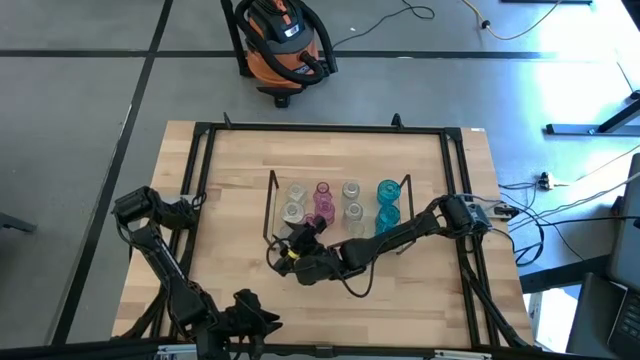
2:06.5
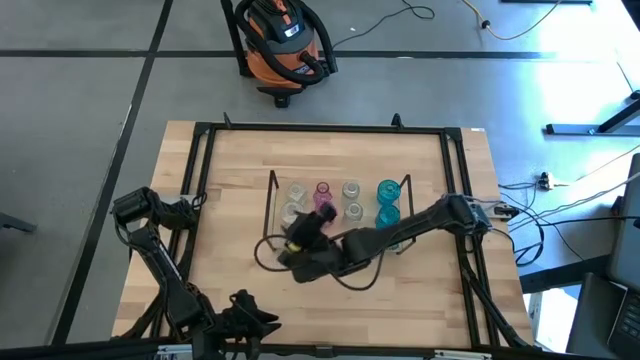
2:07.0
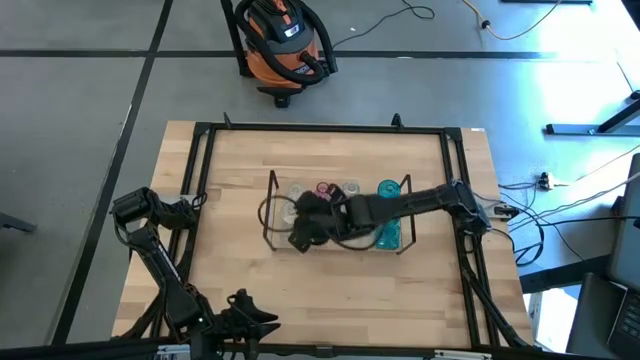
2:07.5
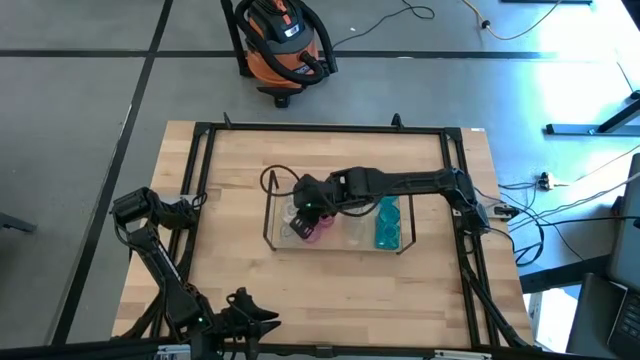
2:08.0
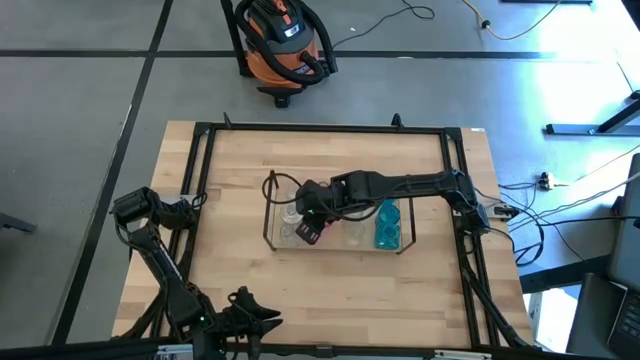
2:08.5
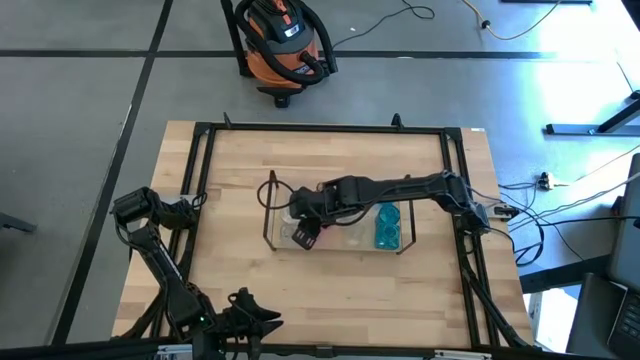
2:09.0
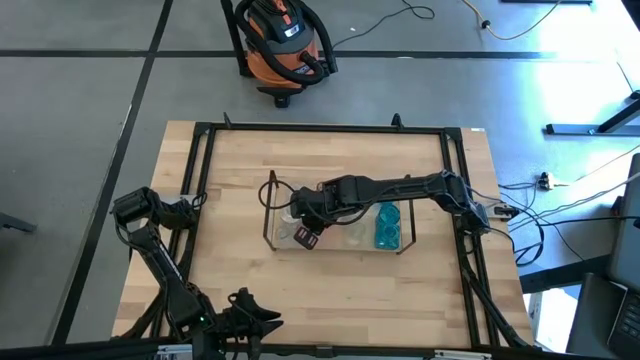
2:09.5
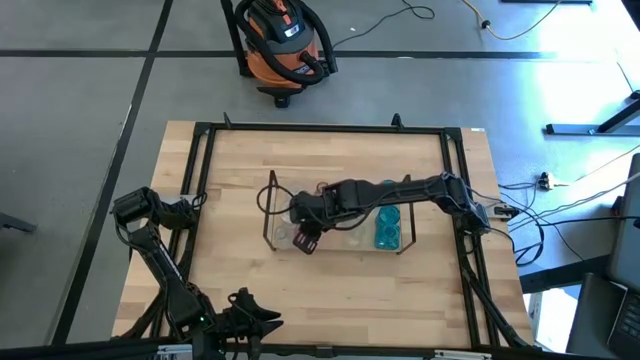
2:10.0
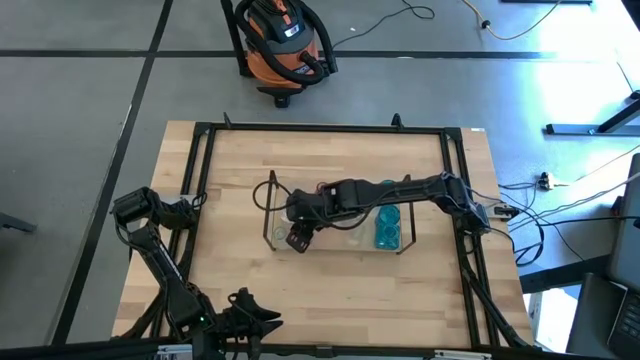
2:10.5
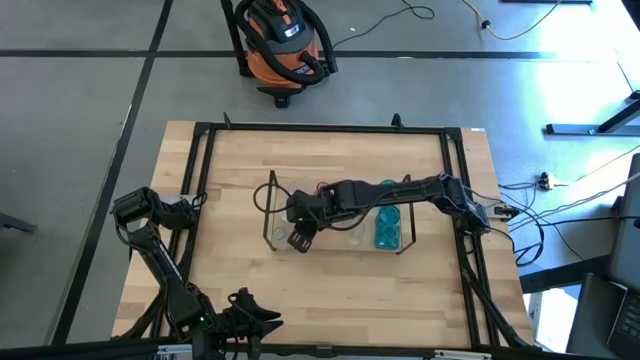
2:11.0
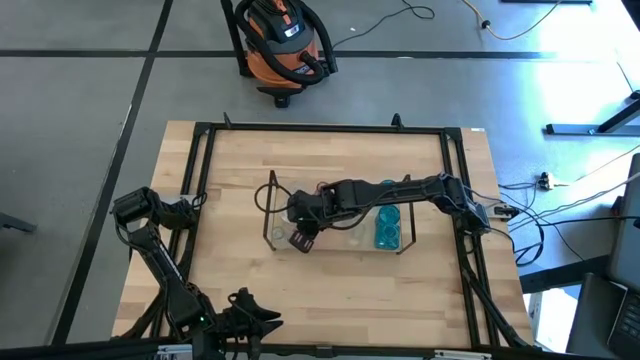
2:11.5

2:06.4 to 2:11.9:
Task: sort vases onto shelf
Adjust the violet vase on the shelf

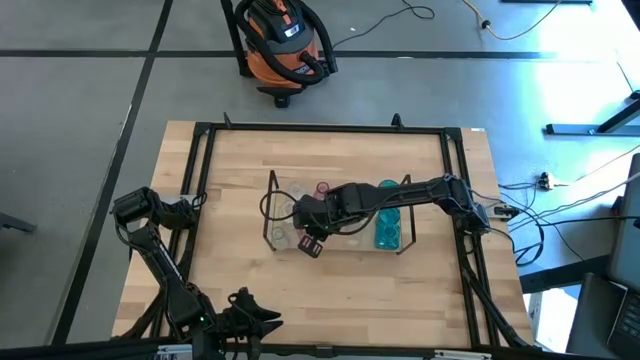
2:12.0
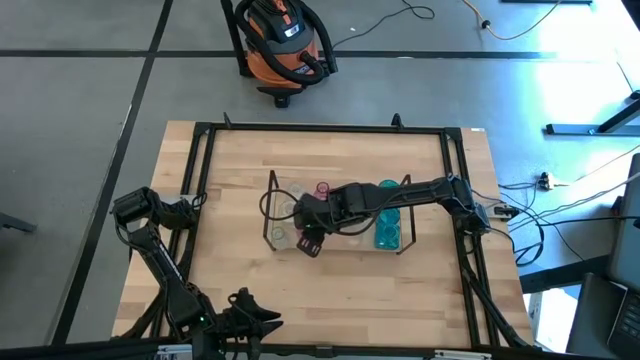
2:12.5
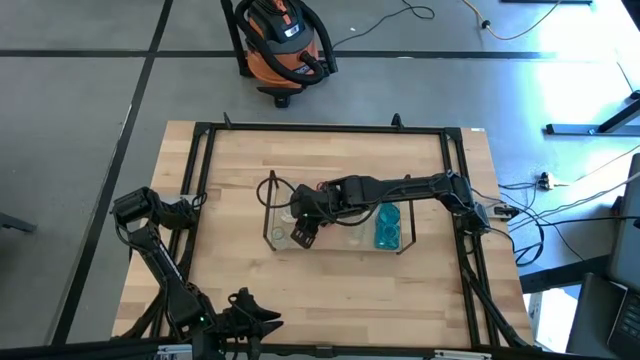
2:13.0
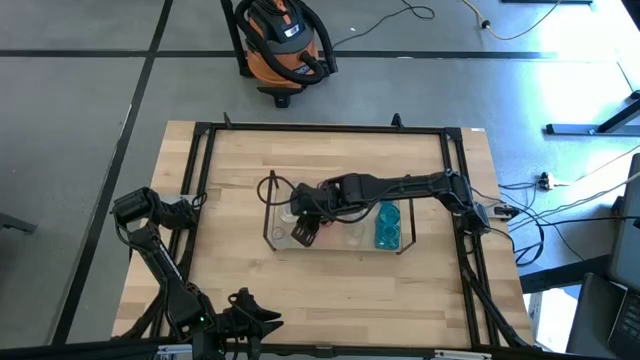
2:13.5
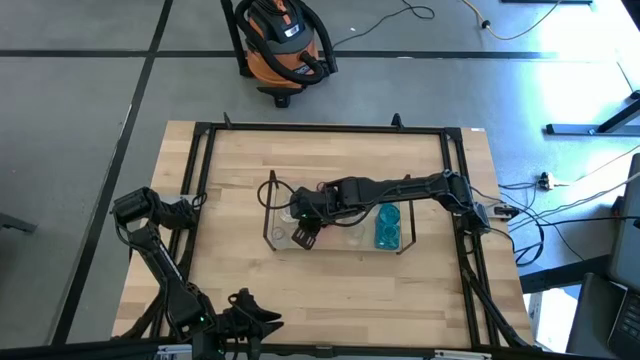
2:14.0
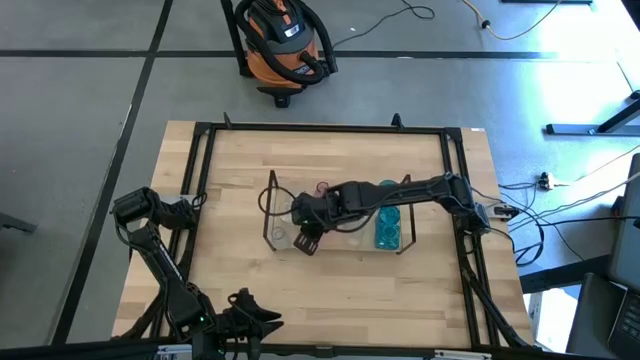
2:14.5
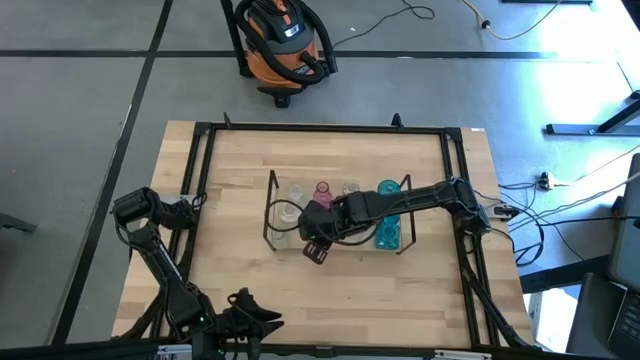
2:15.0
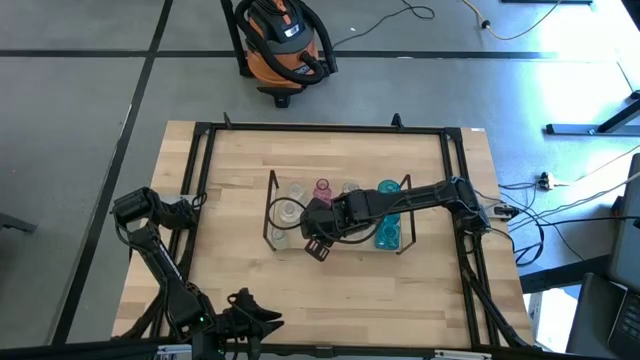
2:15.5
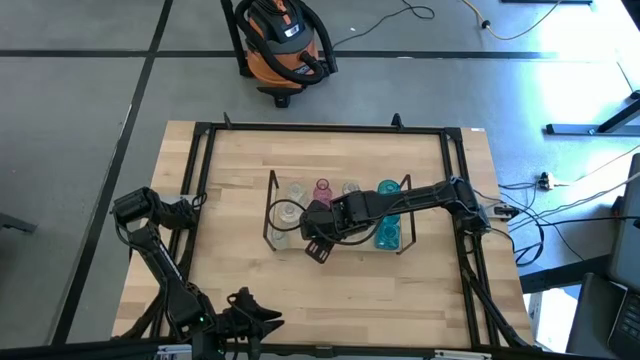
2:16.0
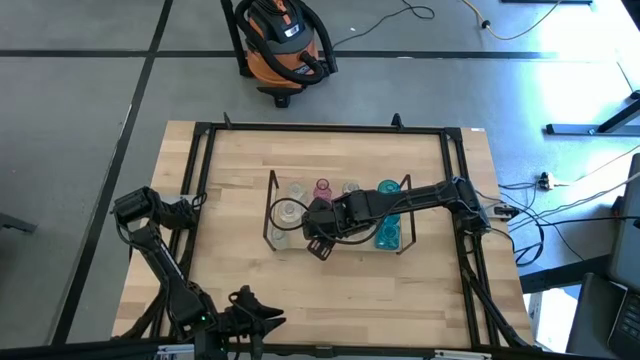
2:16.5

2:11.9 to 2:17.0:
Adjust the violet vase on the shelf

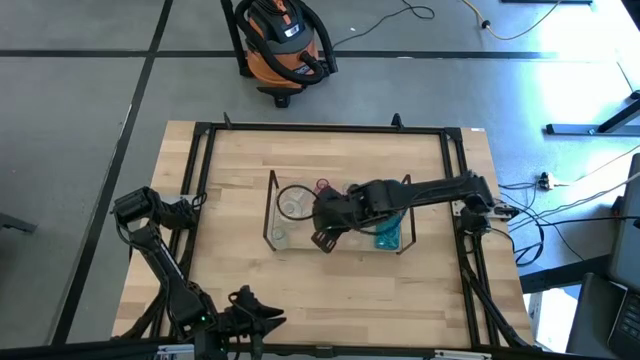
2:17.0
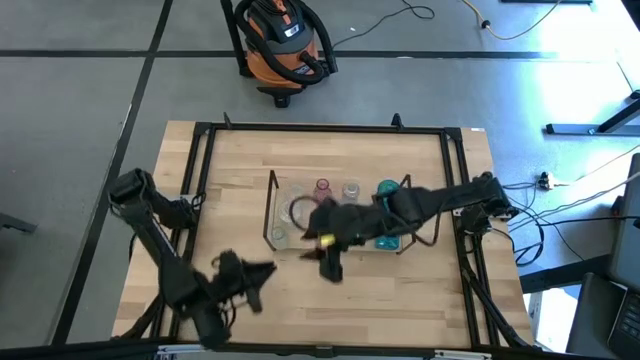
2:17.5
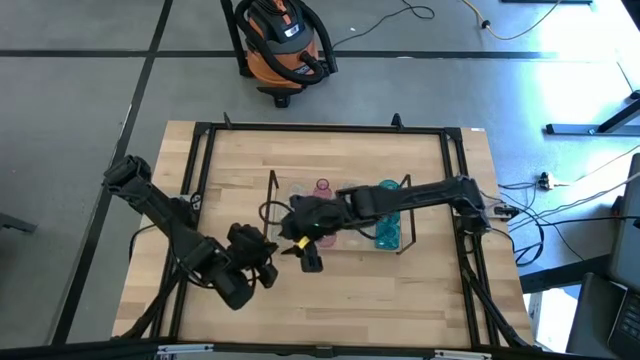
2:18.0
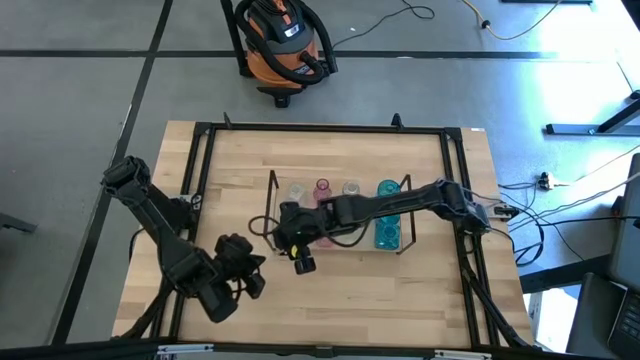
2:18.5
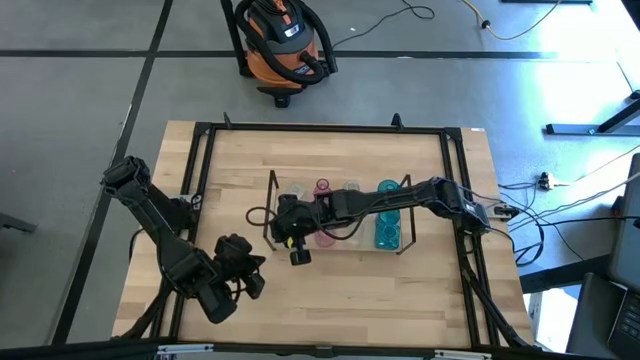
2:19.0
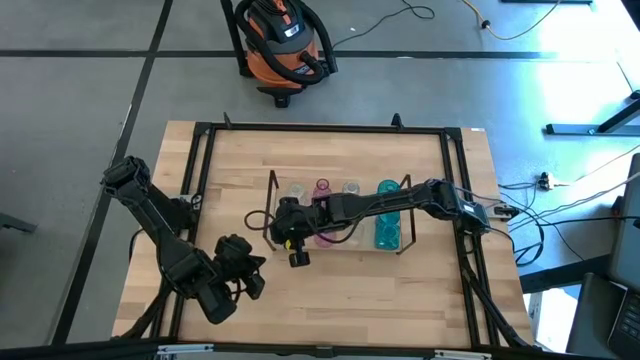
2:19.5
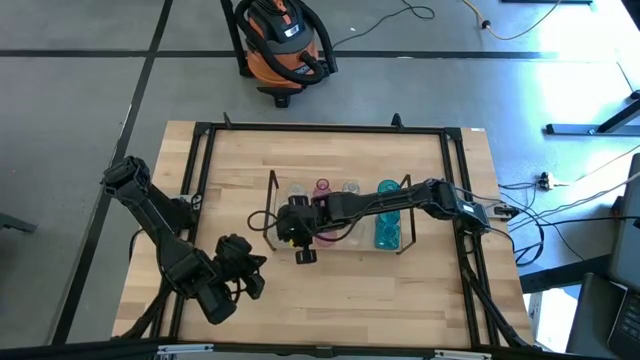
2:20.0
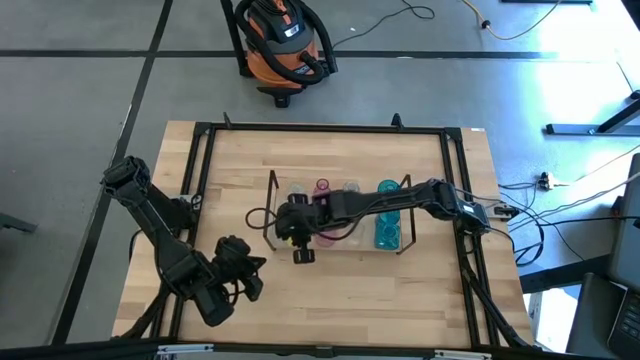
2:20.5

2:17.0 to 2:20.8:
Adjust the transparent vase on the shelf

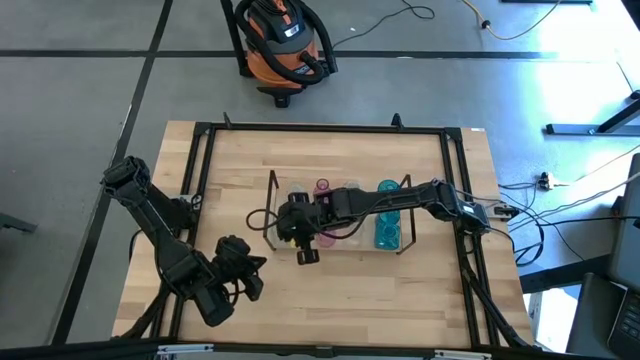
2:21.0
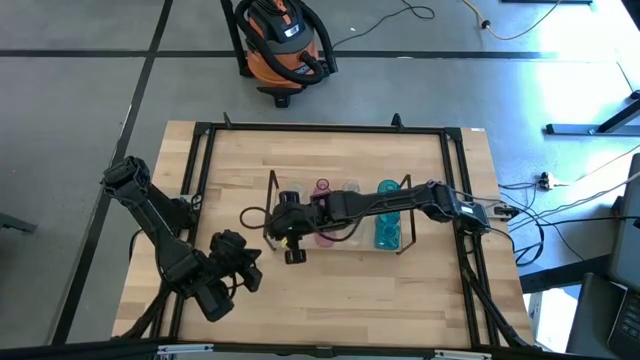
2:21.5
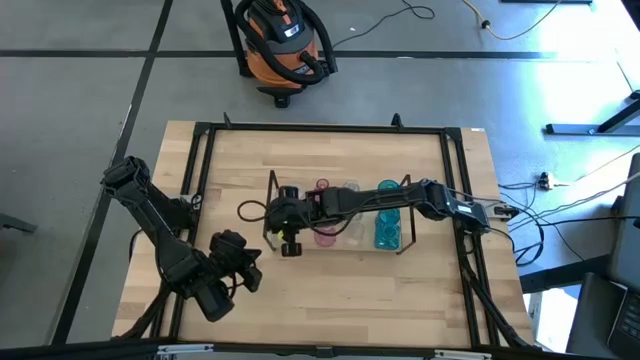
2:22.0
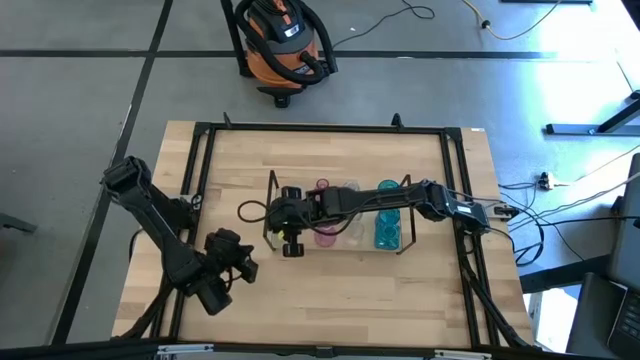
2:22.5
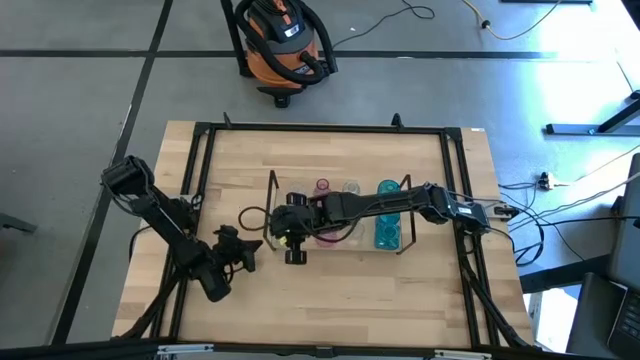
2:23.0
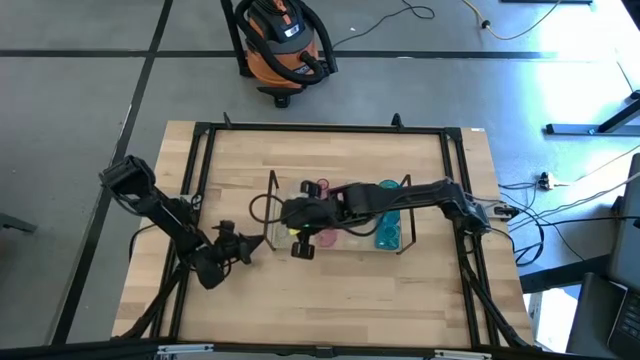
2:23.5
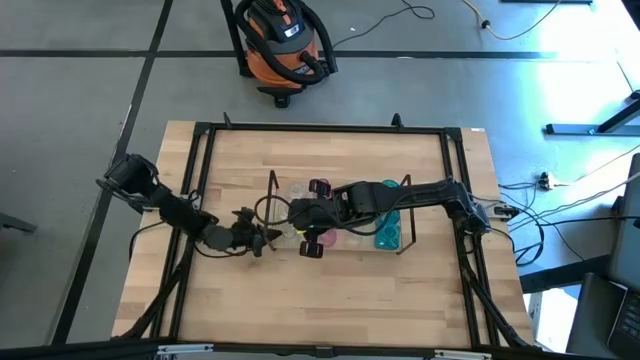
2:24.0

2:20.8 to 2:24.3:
Adjust the transparent vase on the shelf

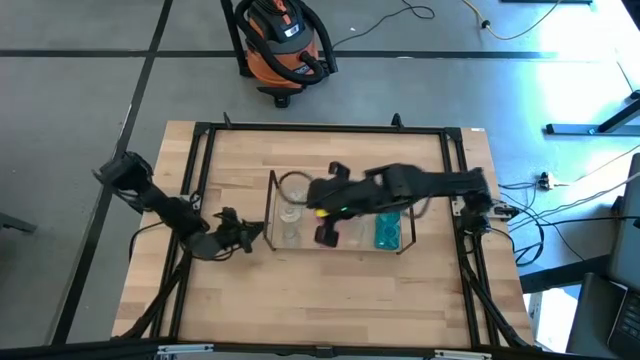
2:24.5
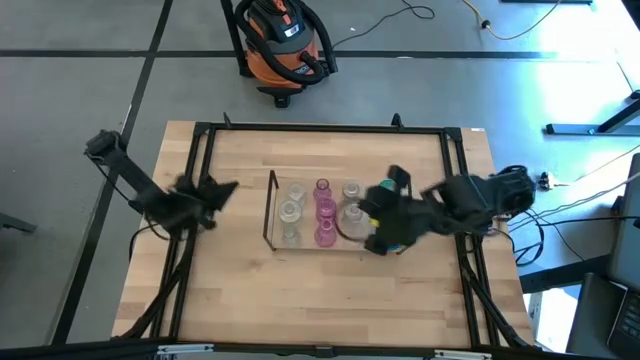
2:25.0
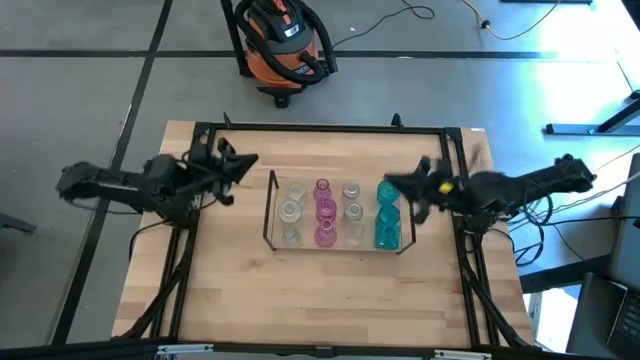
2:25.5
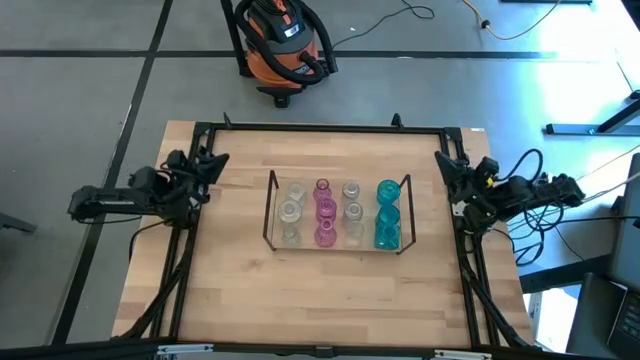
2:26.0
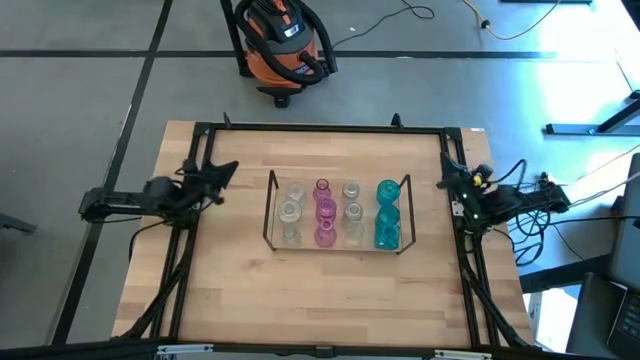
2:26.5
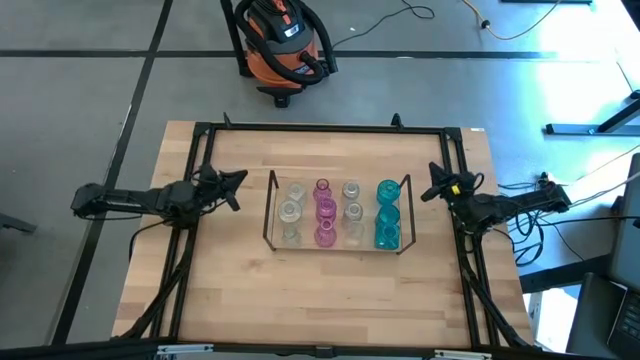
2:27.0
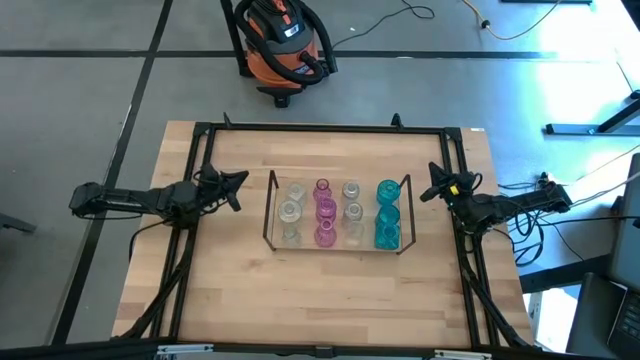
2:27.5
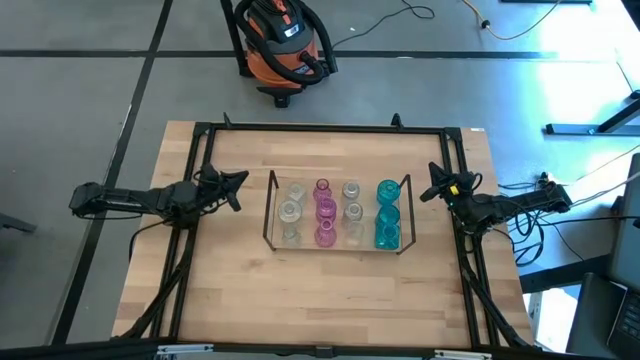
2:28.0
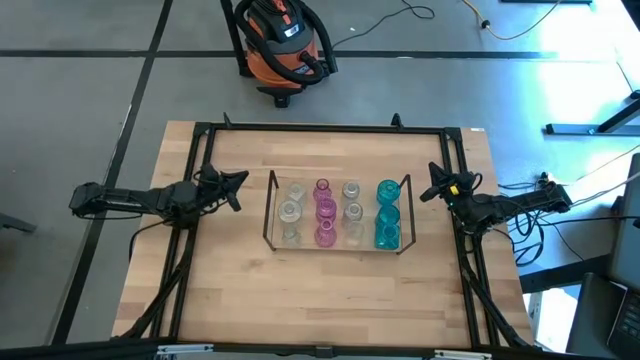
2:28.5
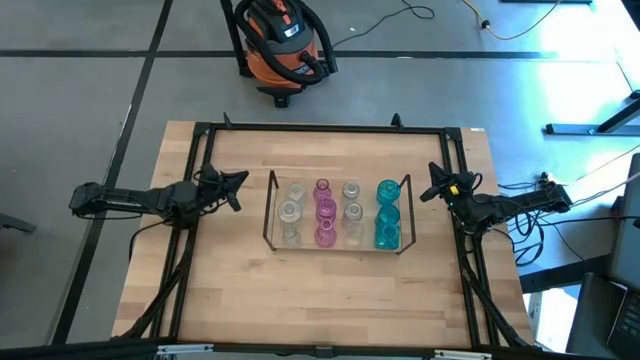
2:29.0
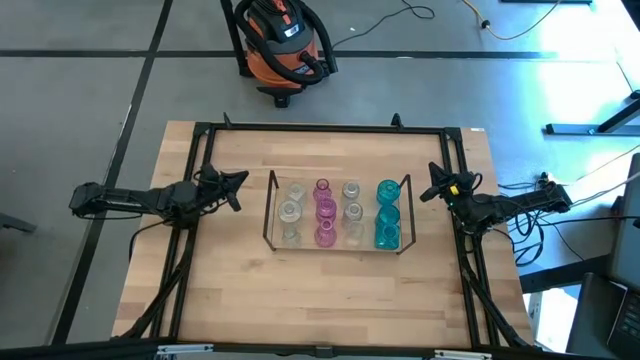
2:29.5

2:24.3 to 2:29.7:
Return to Home Position
